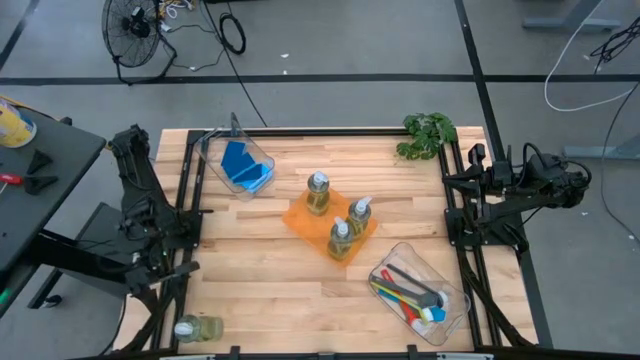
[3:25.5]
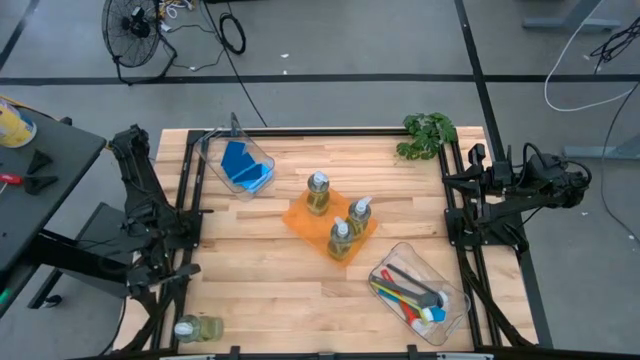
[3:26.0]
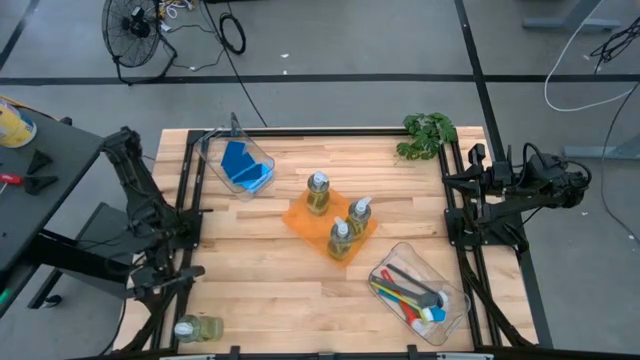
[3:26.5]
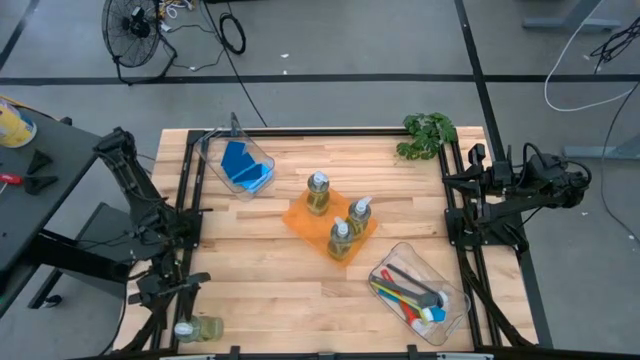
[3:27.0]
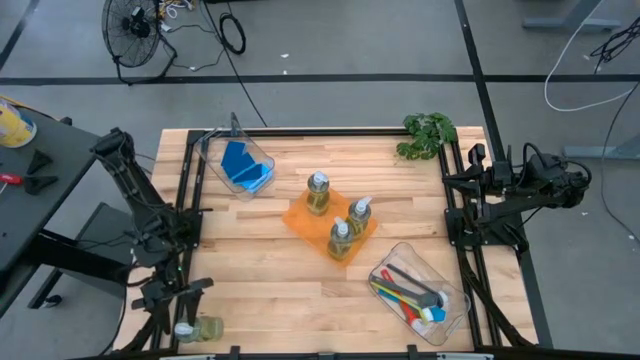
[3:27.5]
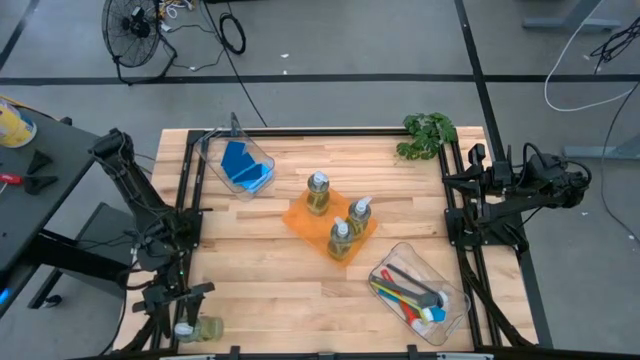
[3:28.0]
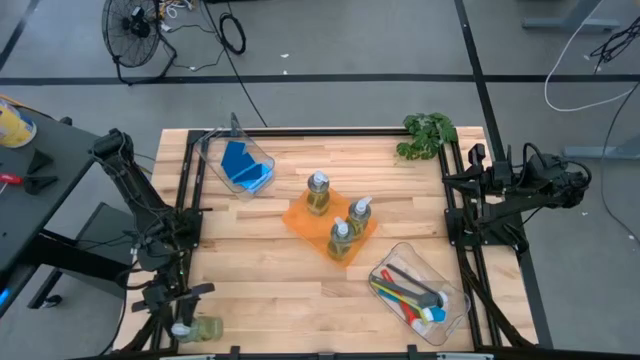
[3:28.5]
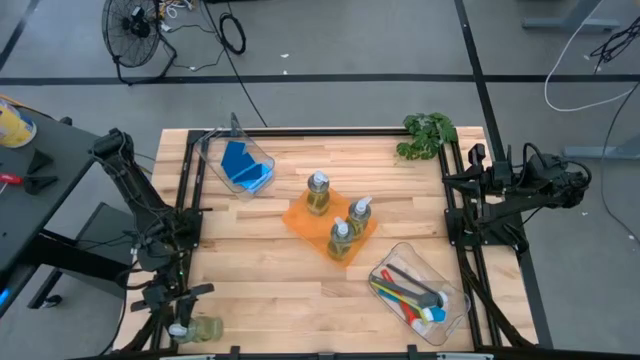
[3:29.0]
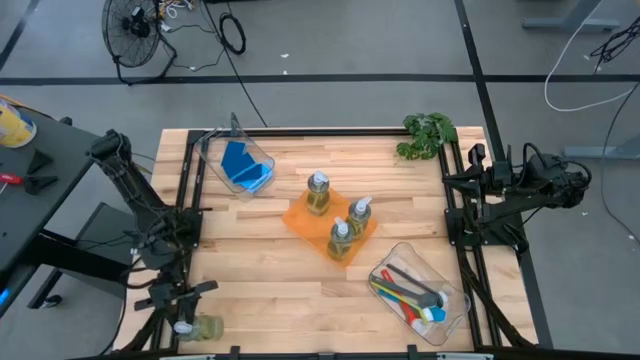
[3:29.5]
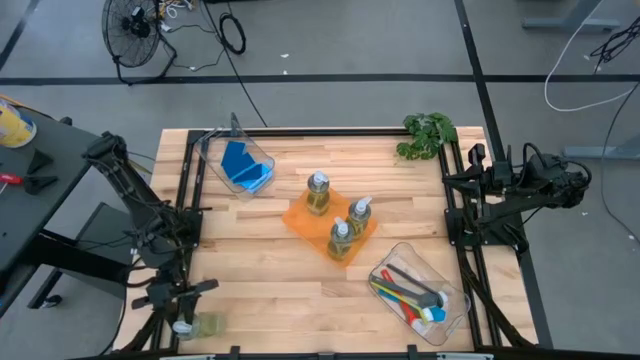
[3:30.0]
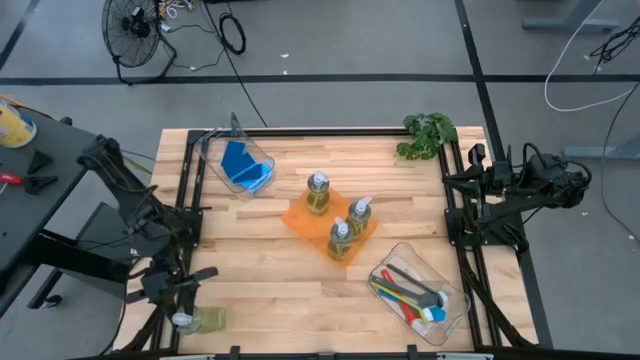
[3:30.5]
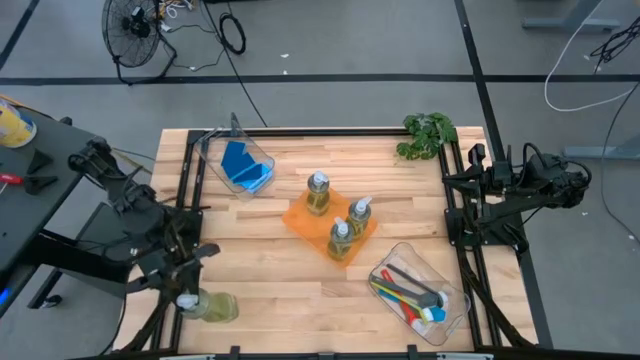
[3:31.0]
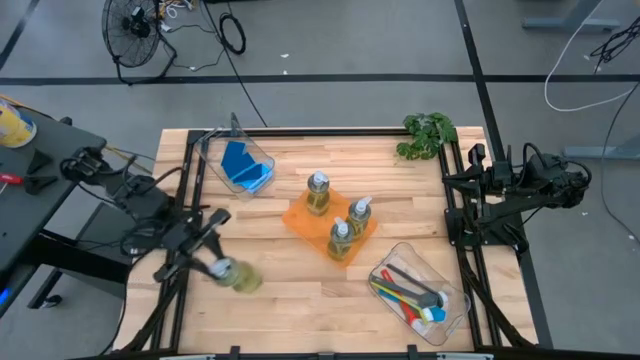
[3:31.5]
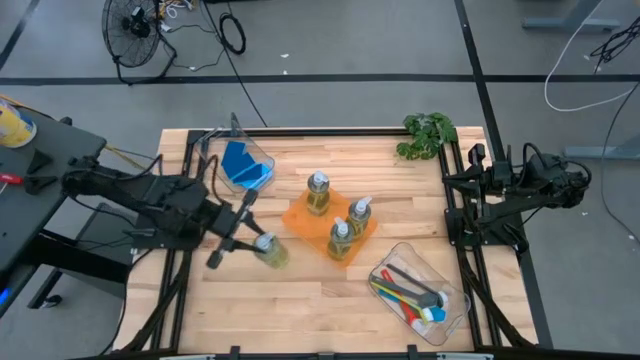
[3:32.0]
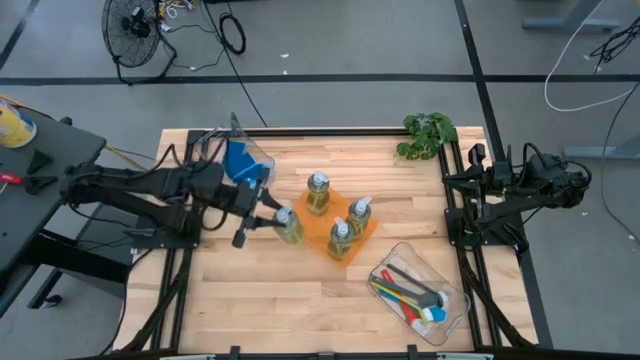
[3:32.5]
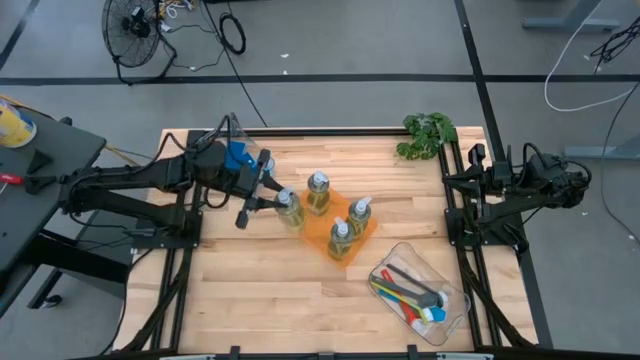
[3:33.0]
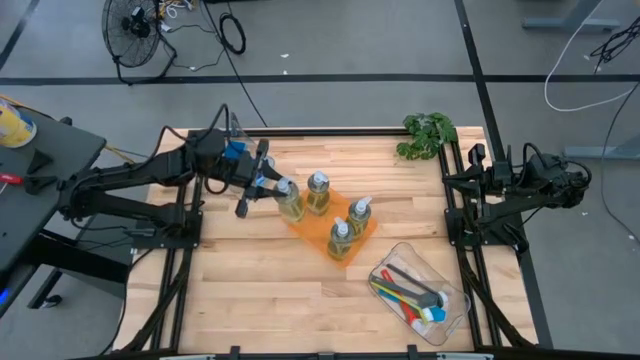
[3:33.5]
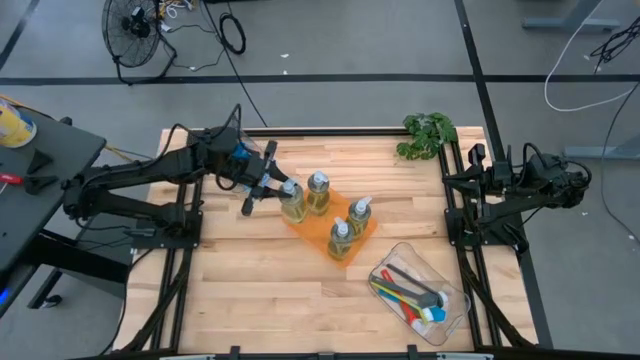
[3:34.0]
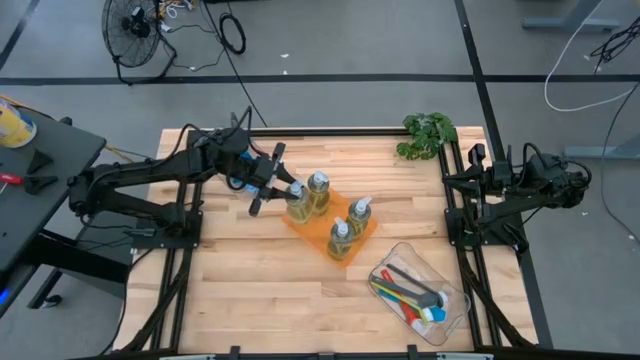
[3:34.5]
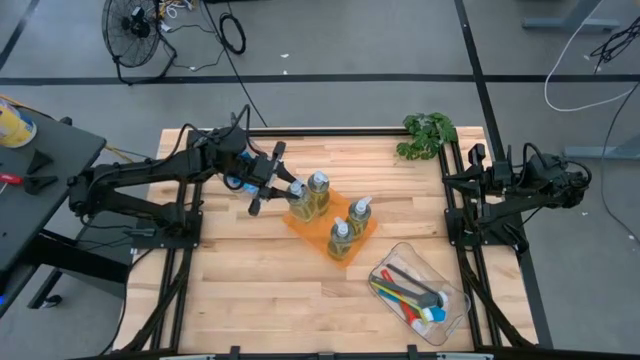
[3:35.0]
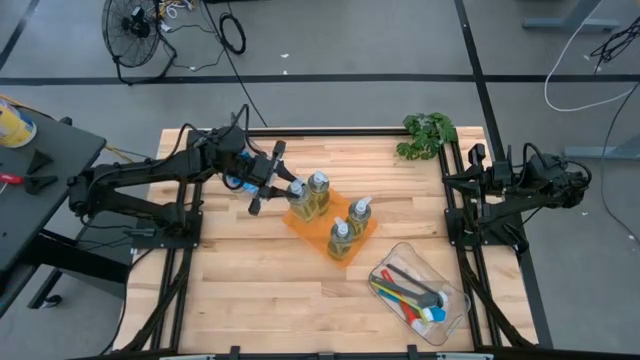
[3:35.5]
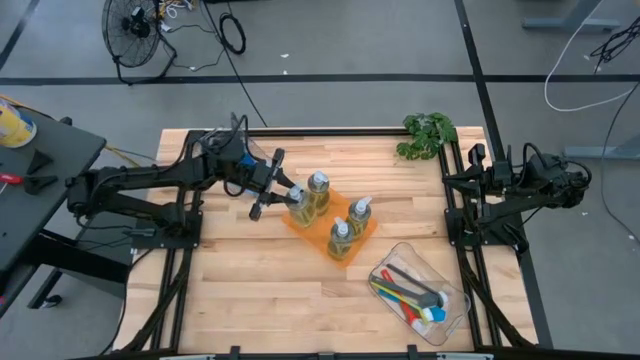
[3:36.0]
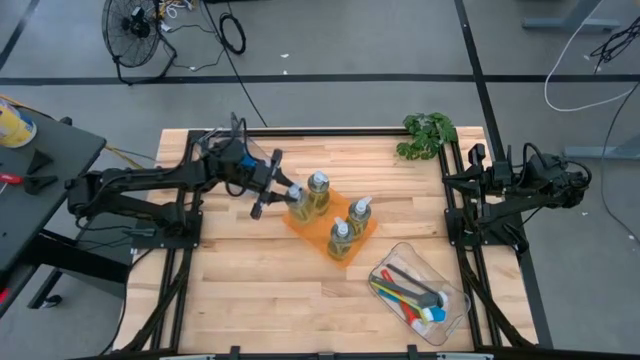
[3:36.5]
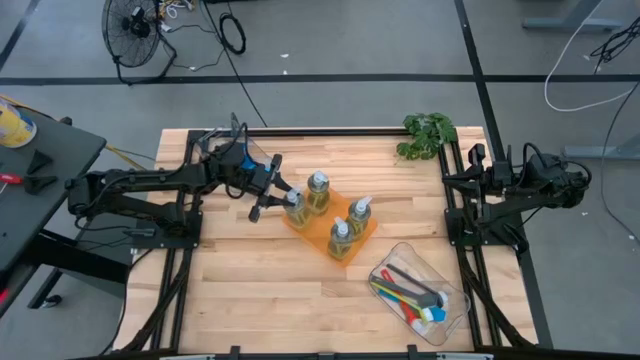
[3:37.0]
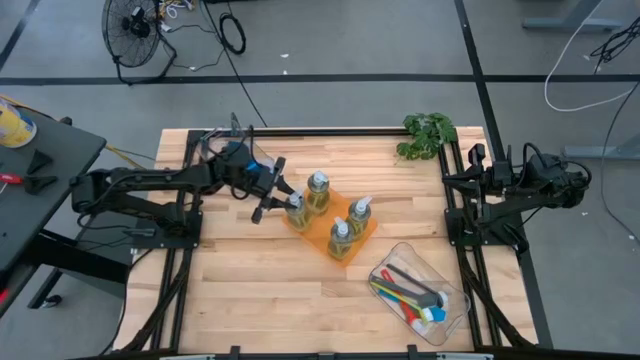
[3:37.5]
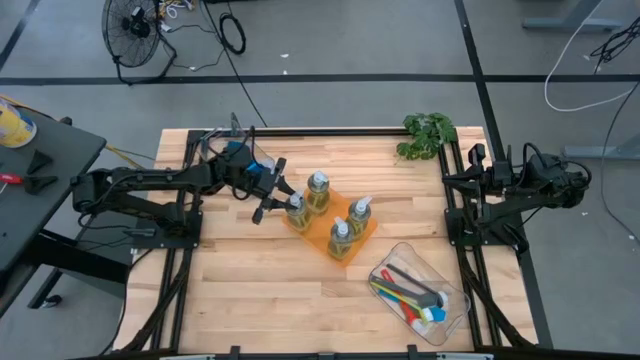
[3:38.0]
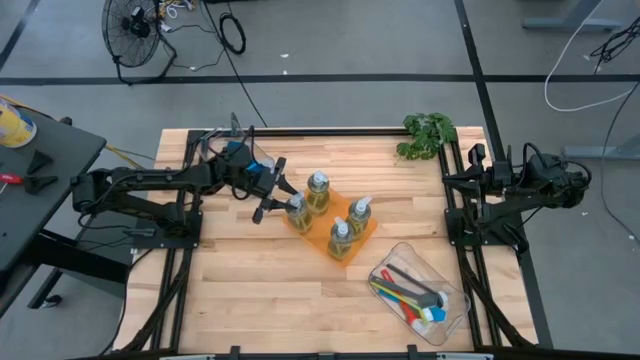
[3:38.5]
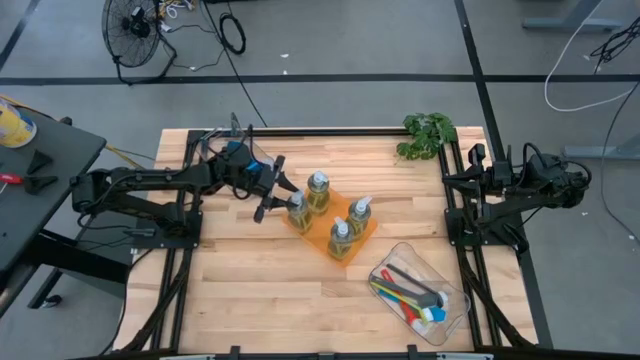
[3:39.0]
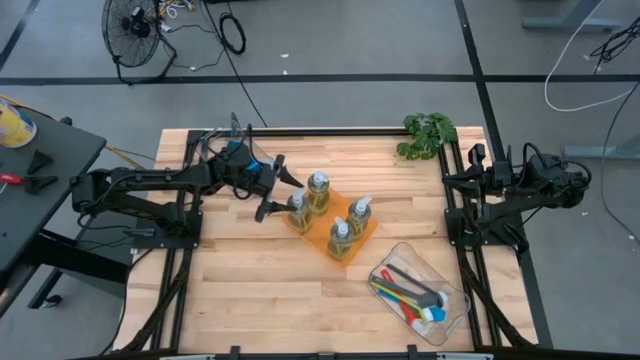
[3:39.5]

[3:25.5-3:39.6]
Task: Pick & Place Kitchen Sink Supplies
Put the yellow dish soap into the orange bin

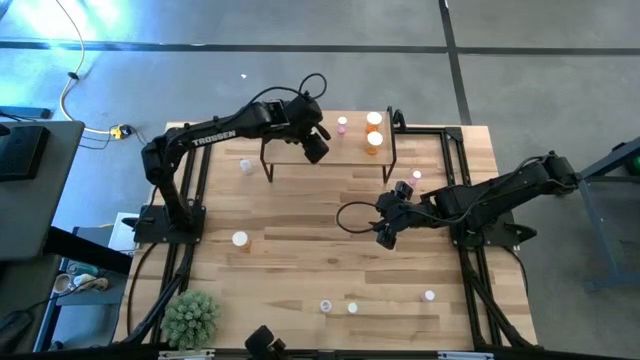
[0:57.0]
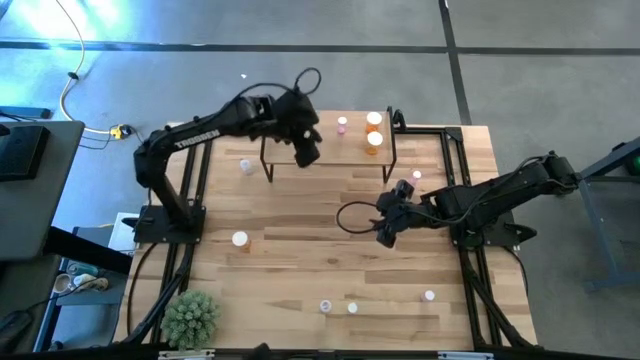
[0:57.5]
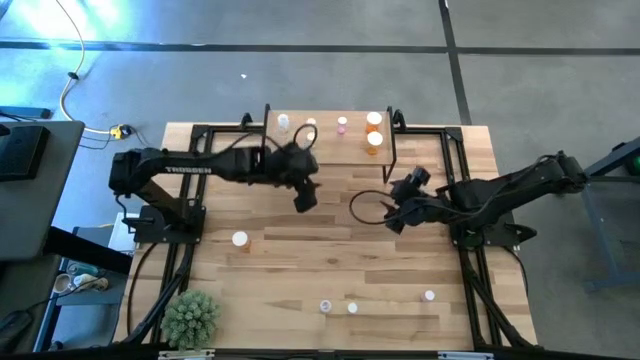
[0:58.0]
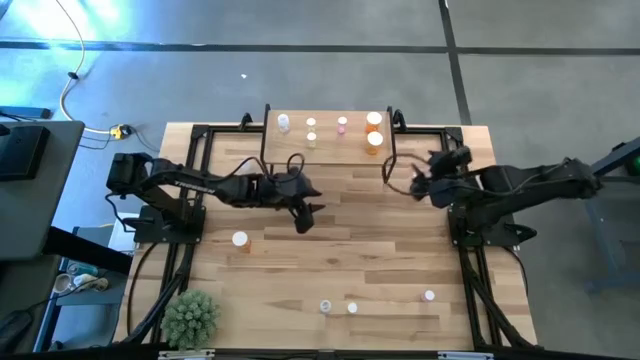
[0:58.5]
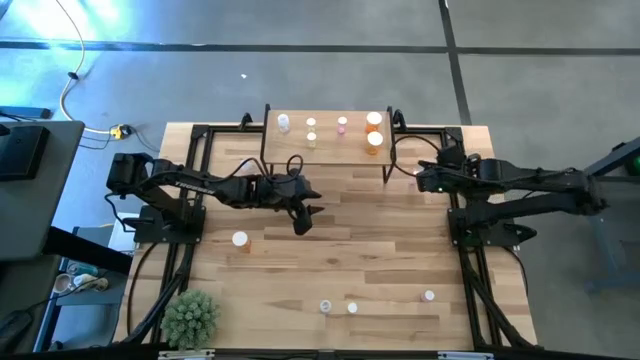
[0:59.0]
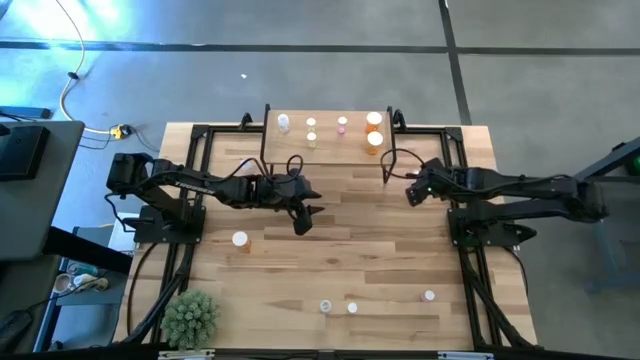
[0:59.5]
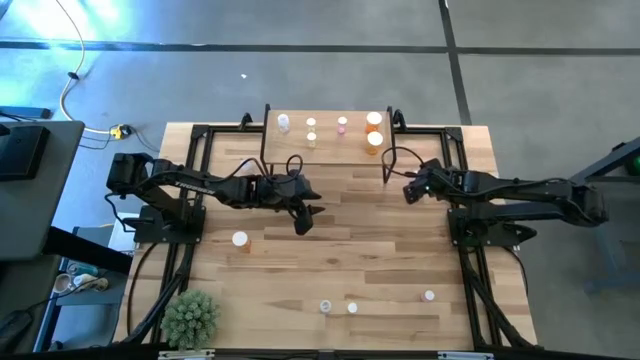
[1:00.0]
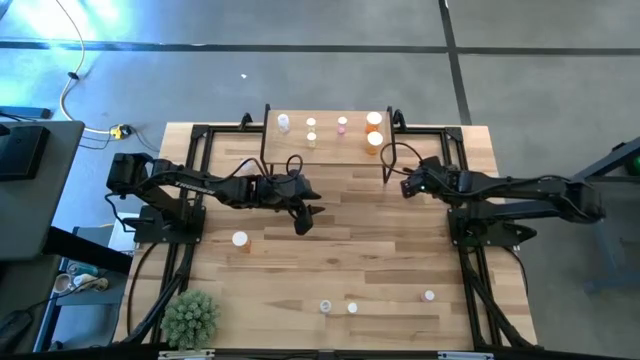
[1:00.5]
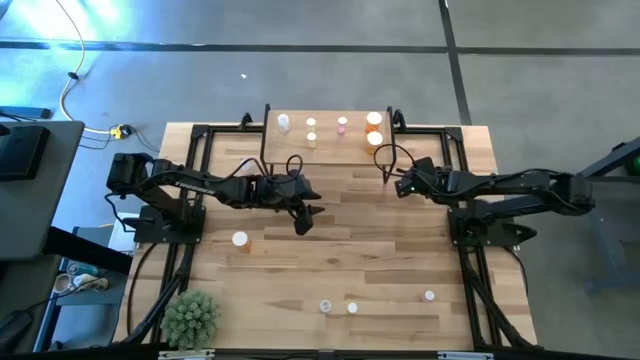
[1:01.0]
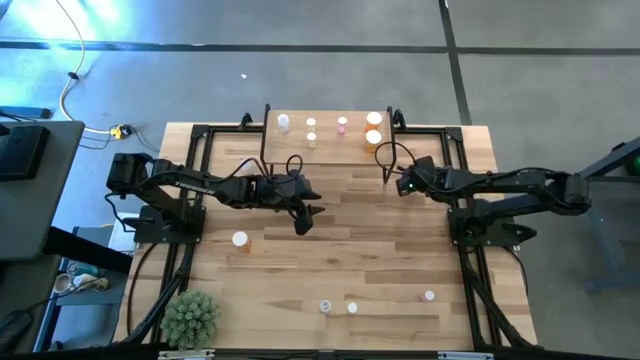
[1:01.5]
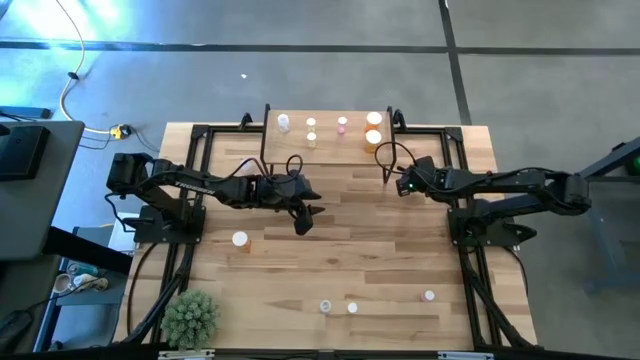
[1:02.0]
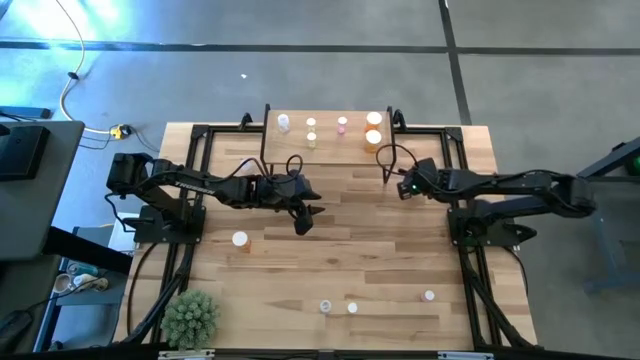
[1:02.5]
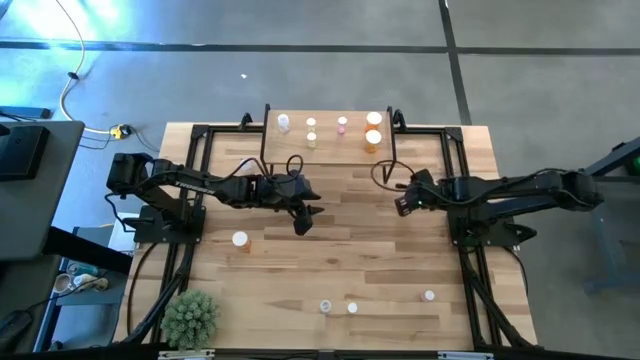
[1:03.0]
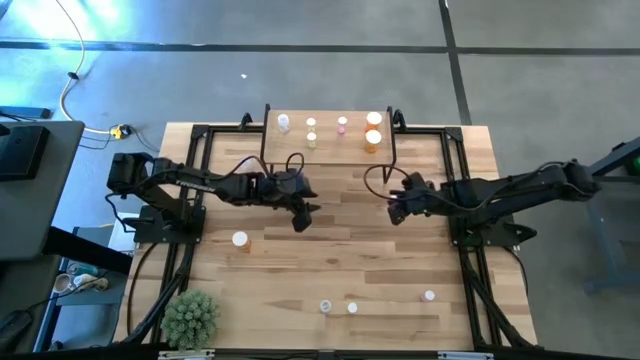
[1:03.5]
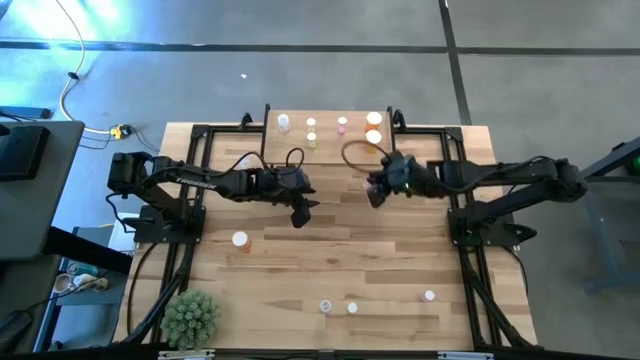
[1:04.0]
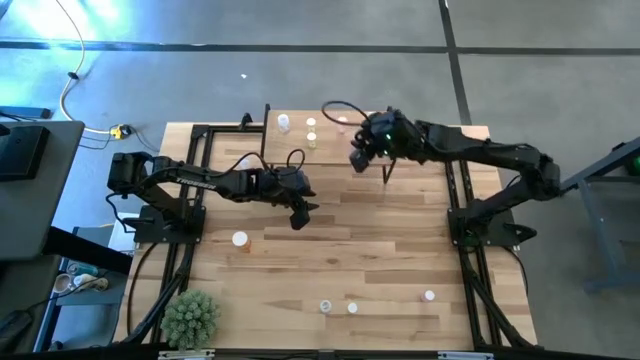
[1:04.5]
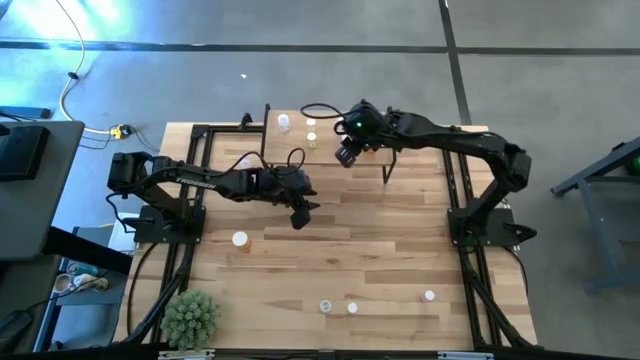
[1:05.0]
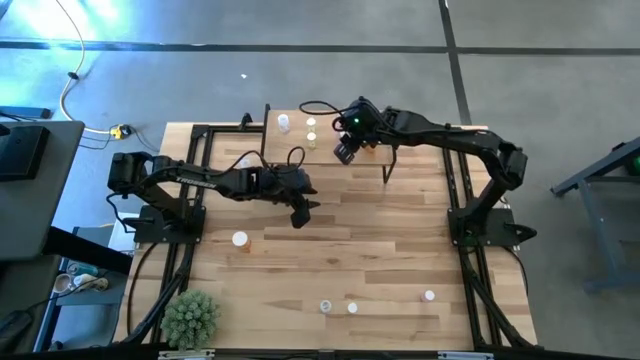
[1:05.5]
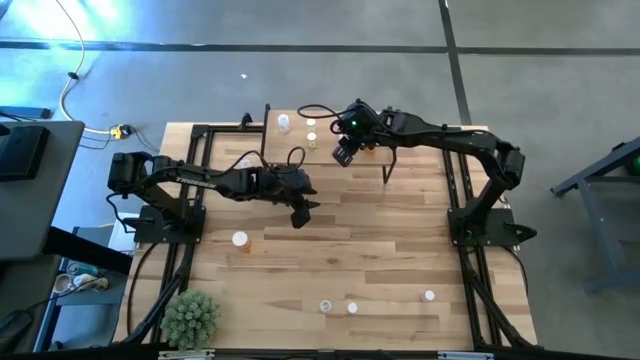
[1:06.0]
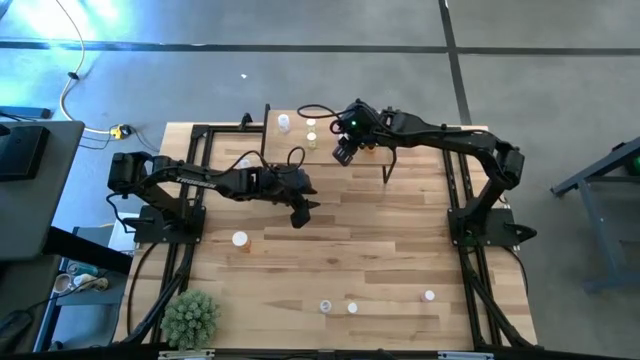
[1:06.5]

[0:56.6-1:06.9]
Task: Pick and place medicine bottles onto shelf by color
Put the top pink pill bottle on the shelf aligned with the pink pill bottle
